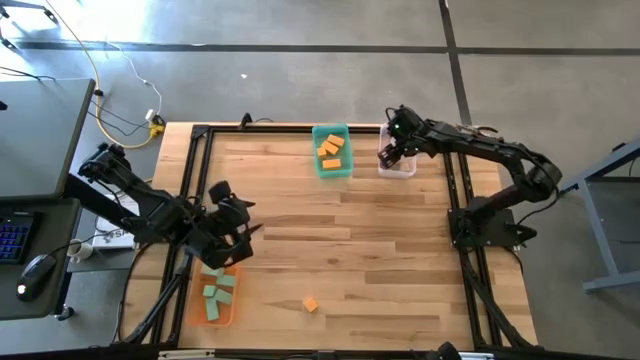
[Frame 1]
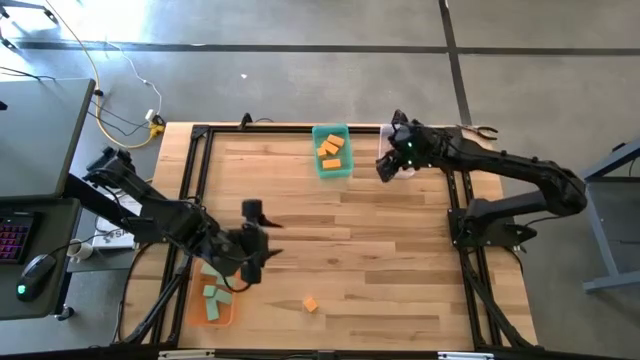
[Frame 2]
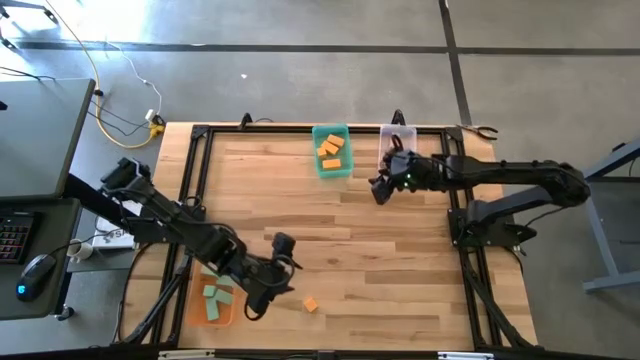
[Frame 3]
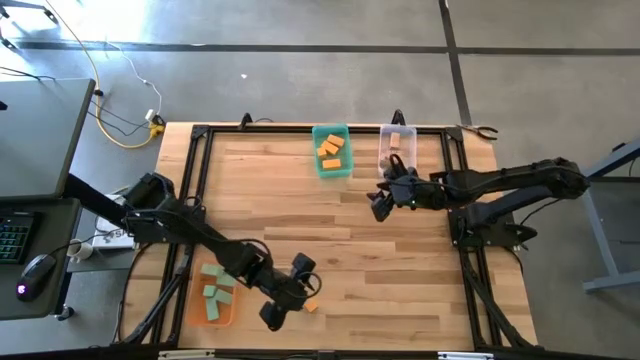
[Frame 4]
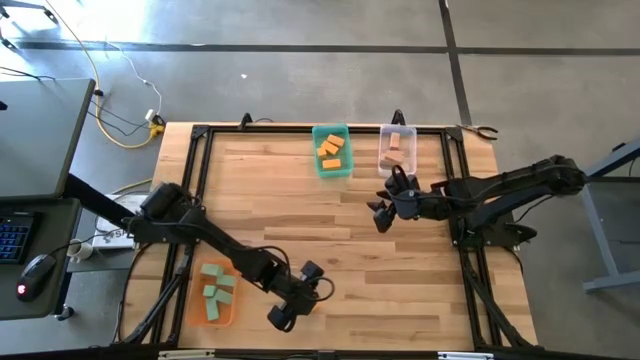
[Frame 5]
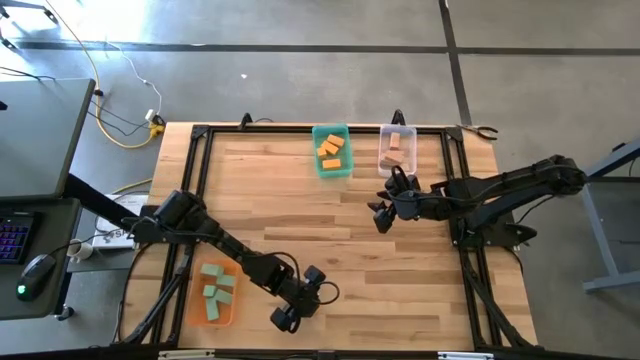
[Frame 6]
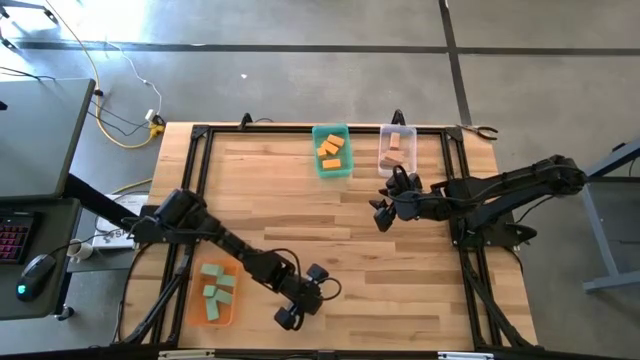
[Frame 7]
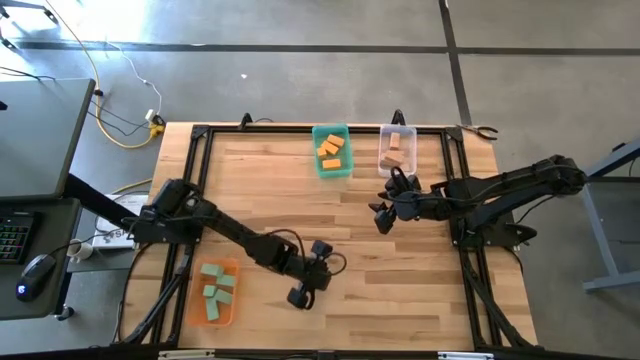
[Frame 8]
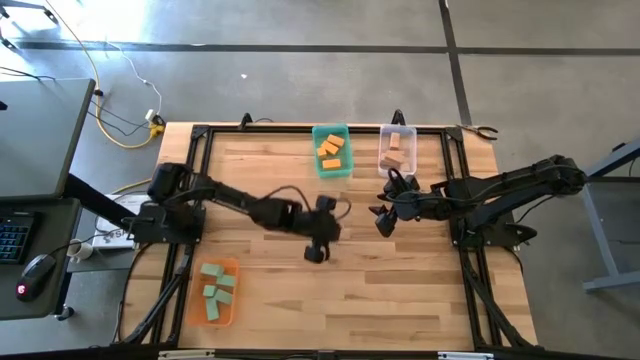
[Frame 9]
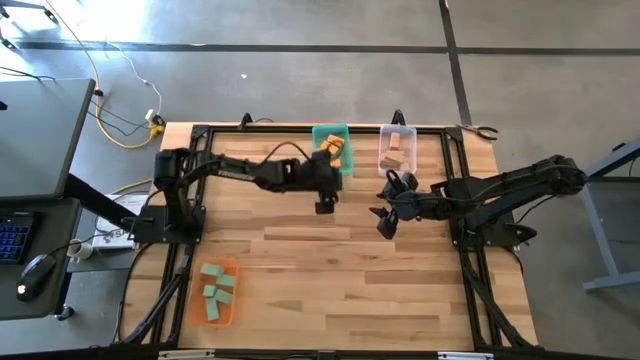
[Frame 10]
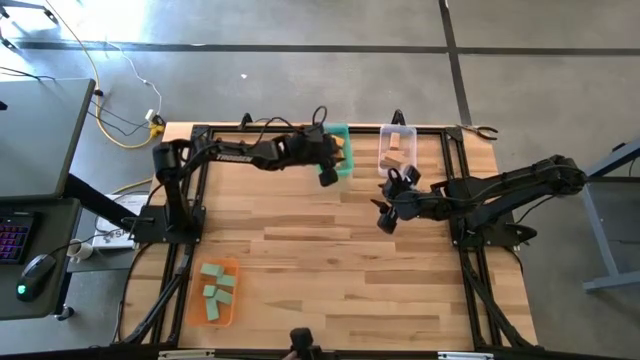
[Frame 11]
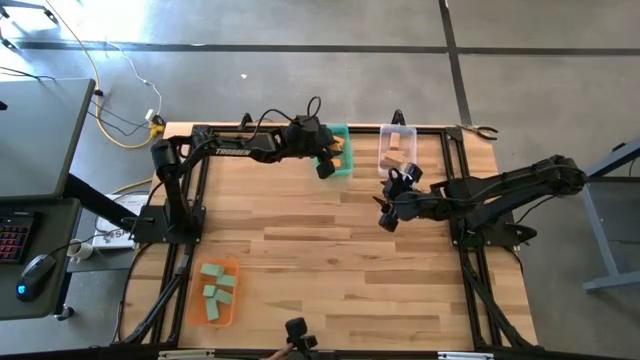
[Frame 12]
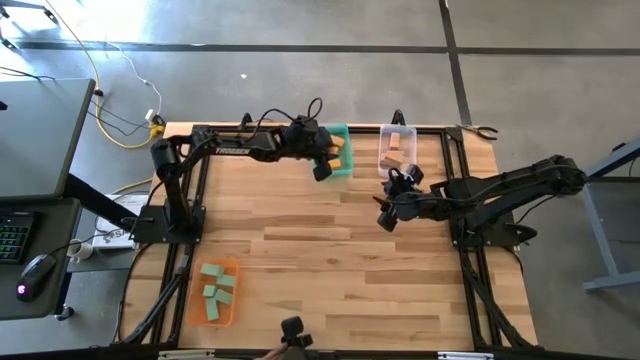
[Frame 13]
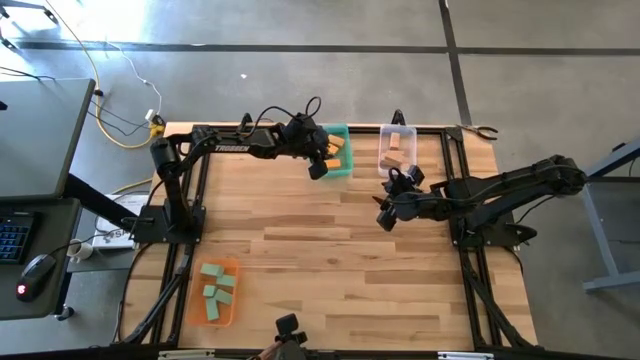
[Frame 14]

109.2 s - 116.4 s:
Task: Sort & place blocks by color
Put the yellow block into the blue bin

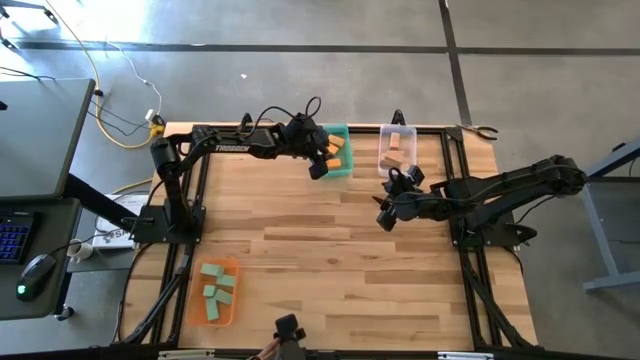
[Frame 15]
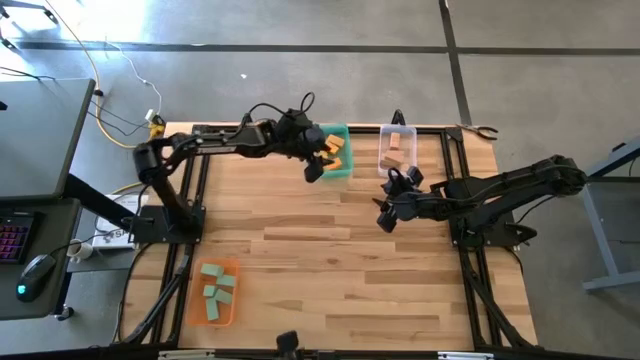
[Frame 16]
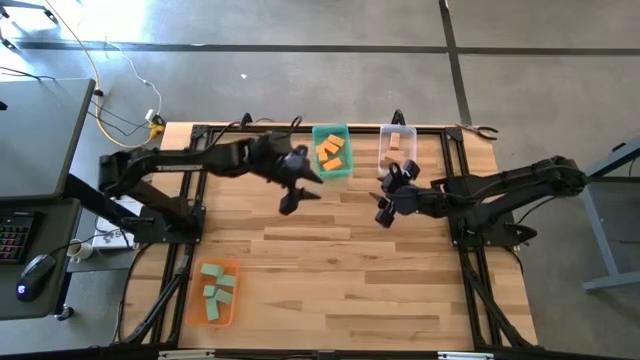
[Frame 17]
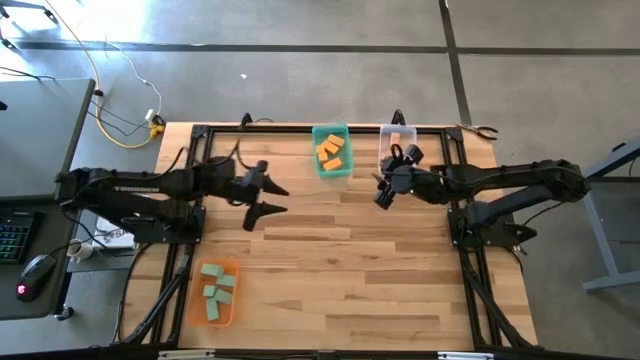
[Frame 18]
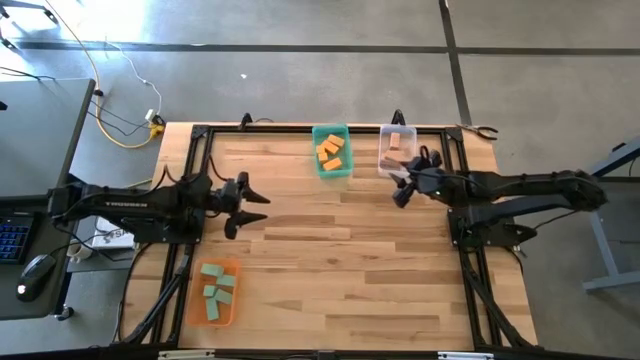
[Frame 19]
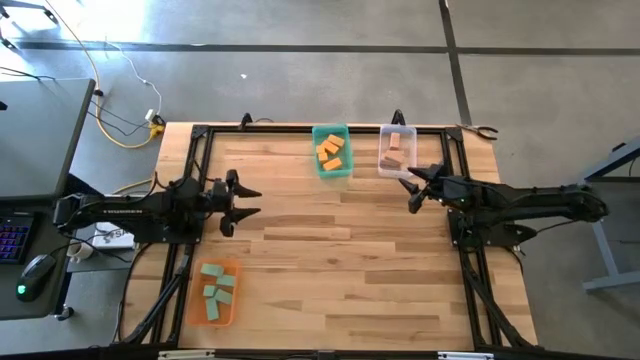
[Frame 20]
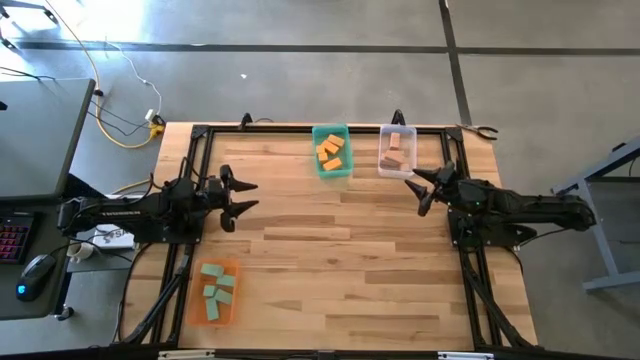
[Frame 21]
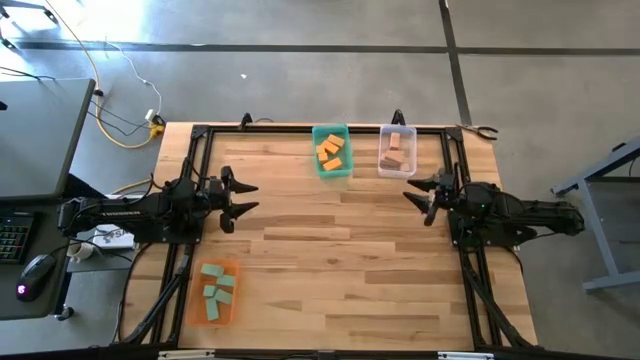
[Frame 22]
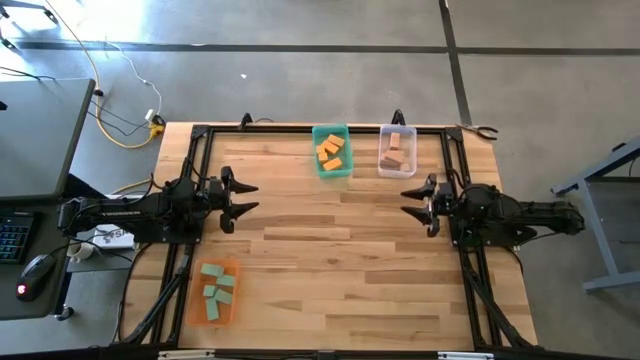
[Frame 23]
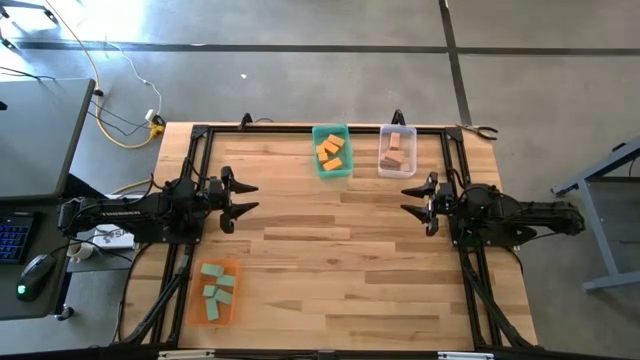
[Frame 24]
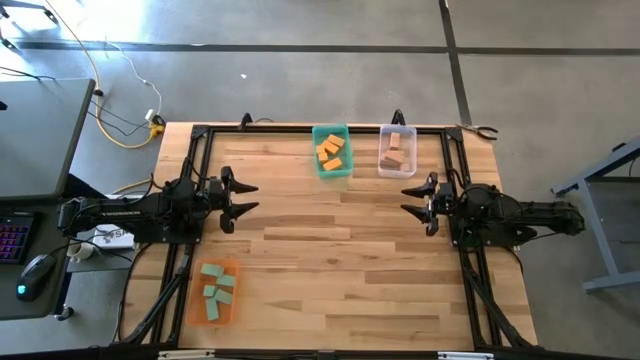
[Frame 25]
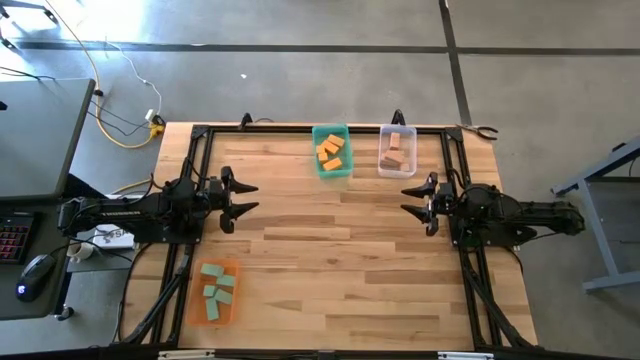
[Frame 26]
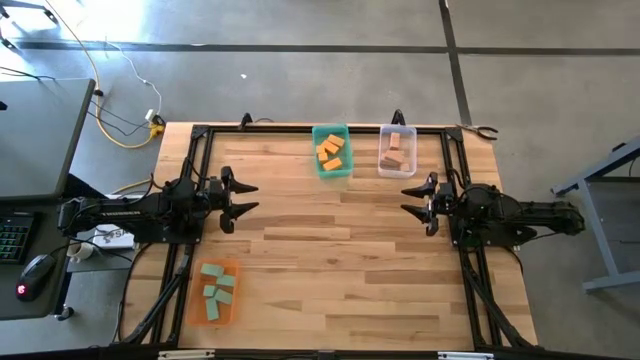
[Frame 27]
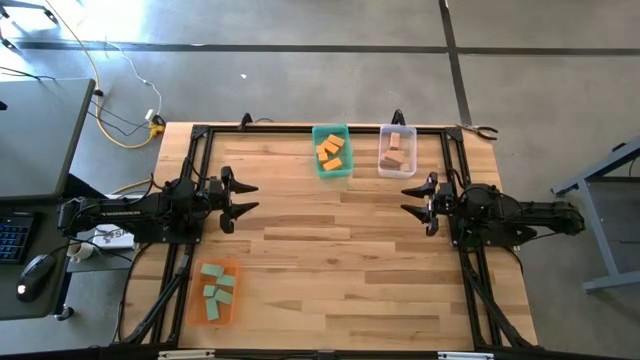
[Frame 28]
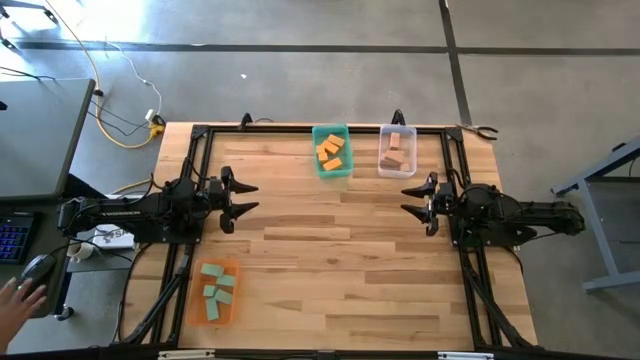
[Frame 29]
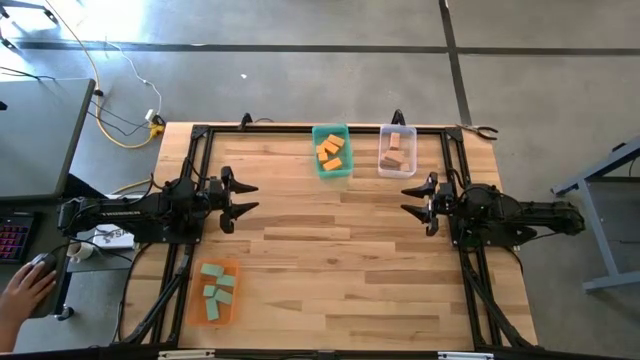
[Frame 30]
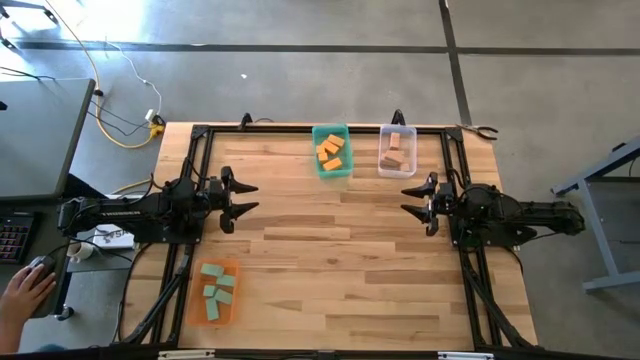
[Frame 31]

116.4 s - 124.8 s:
Return to Home Position

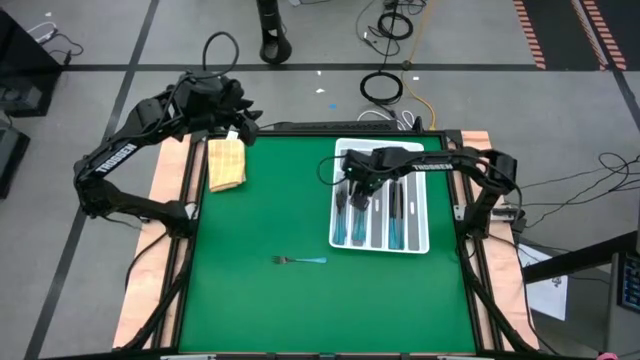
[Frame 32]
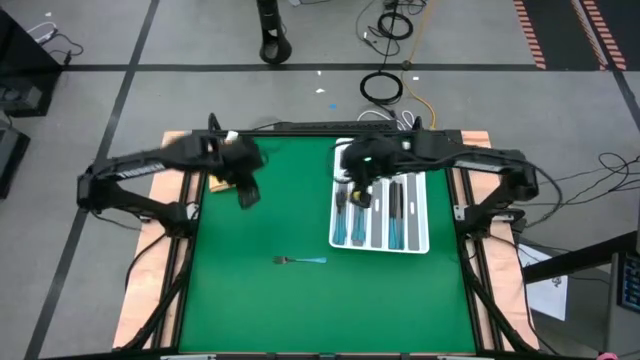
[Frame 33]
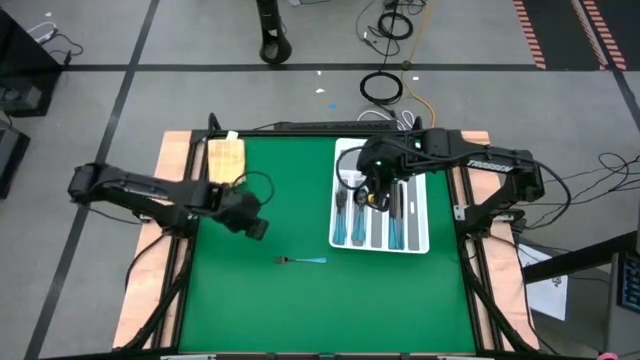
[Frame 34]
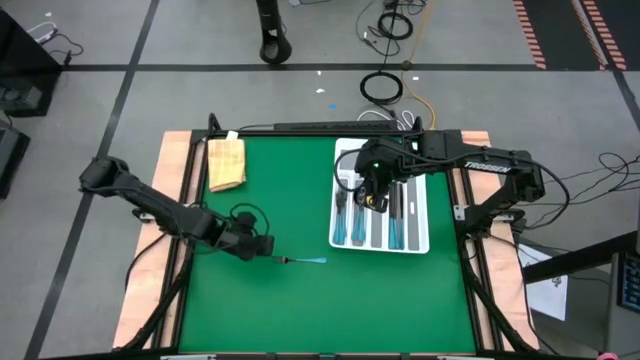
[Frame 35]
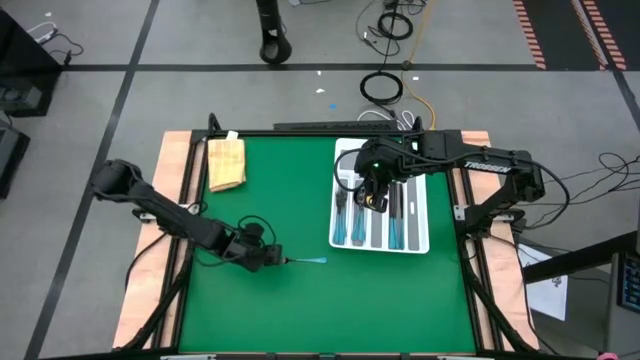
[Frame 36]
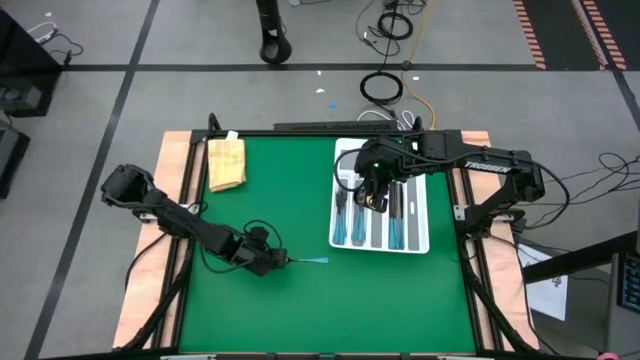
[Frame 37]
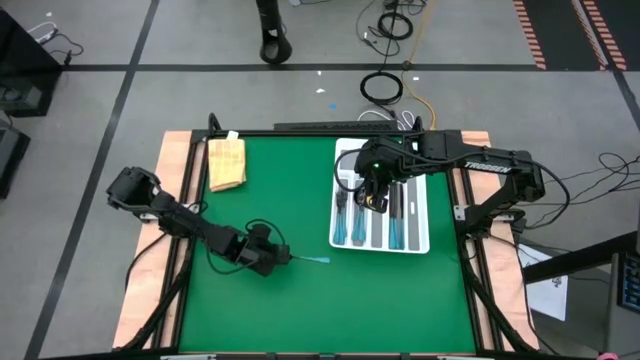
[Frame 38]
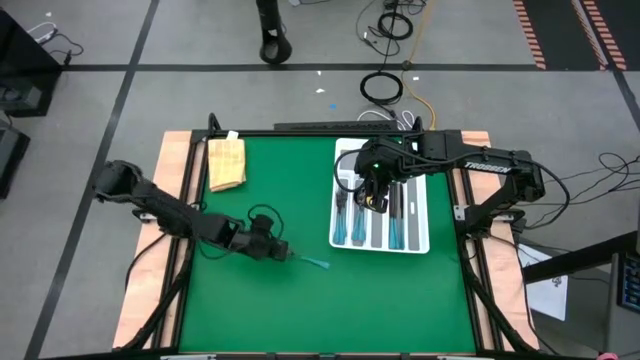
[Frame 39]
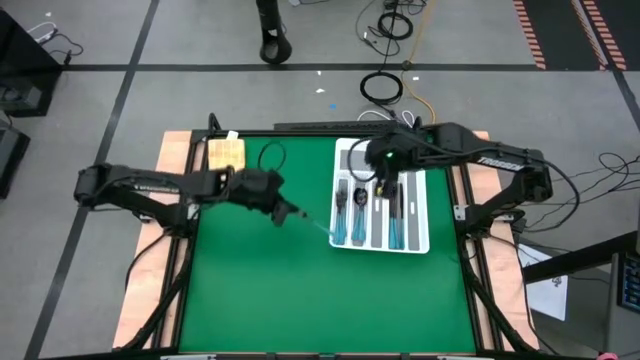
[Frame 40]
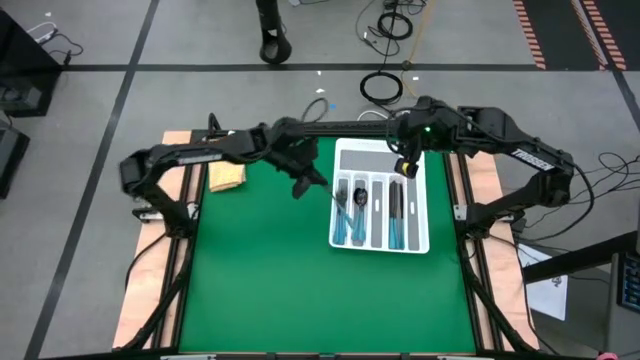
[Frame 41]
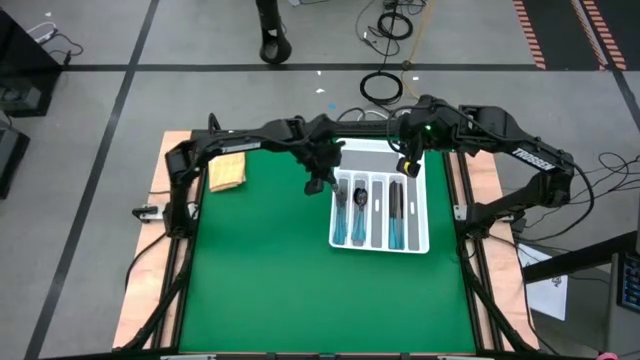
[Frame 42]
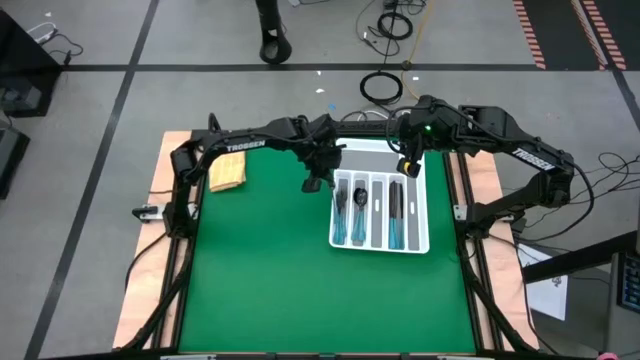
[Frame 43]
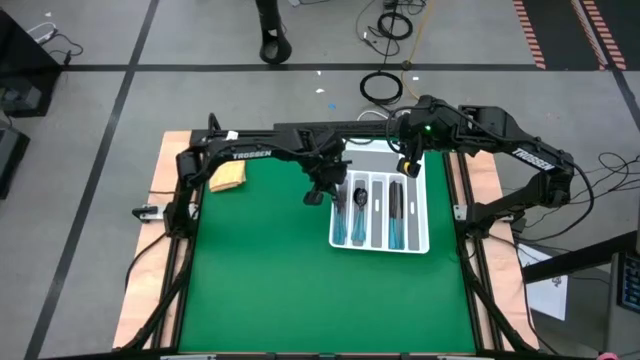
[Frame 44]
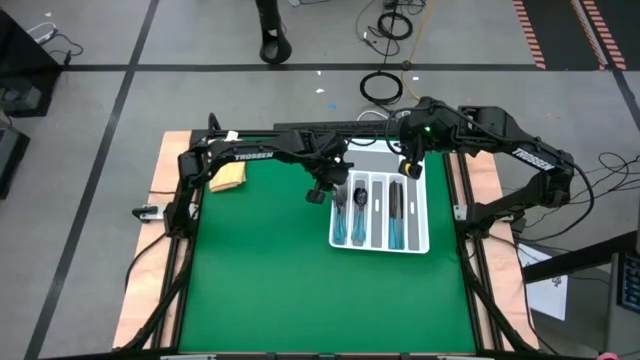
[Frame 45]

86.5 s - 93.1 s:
Task: Sort silverware
Put the blue fork into the silverware tray with the other blue forks
